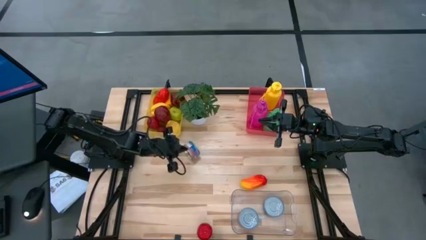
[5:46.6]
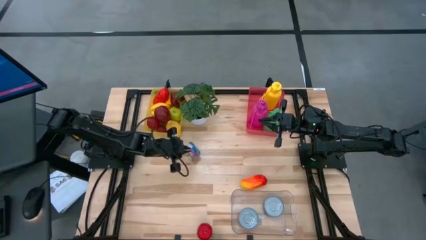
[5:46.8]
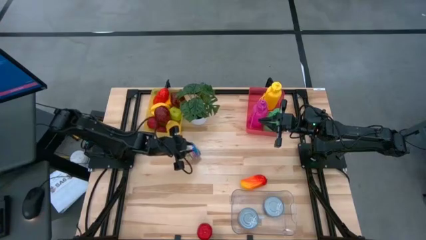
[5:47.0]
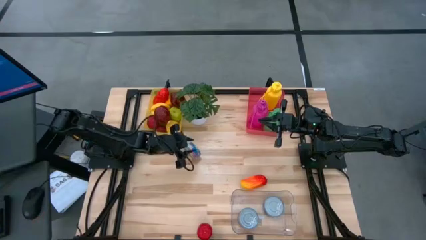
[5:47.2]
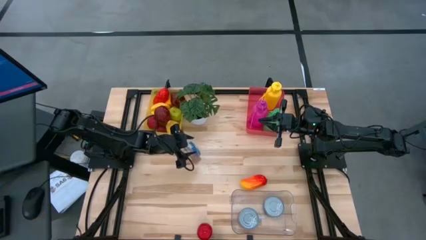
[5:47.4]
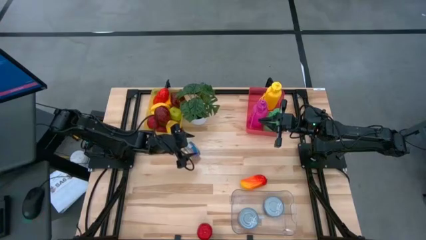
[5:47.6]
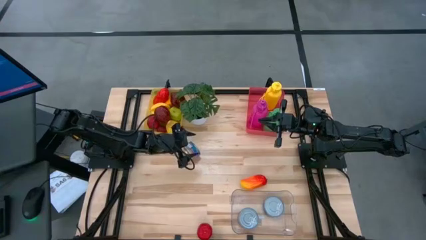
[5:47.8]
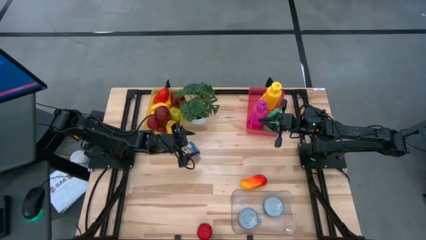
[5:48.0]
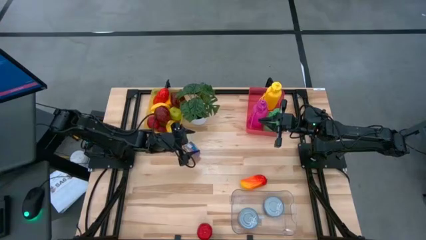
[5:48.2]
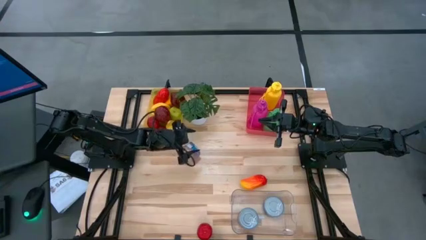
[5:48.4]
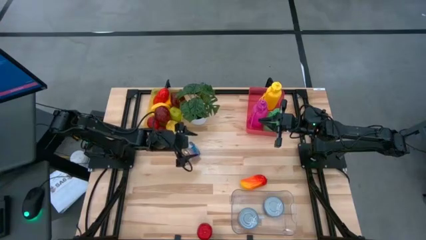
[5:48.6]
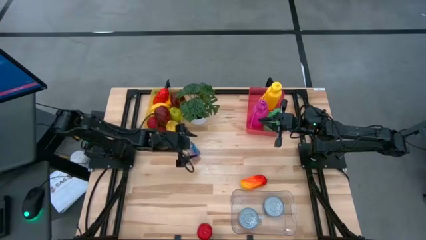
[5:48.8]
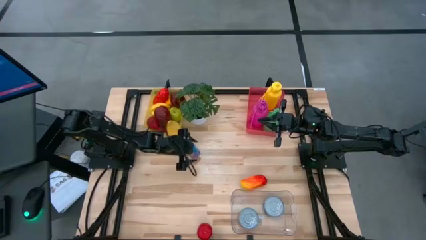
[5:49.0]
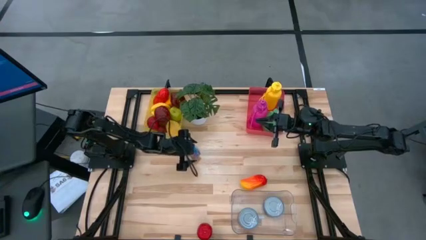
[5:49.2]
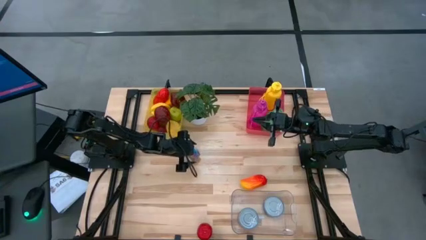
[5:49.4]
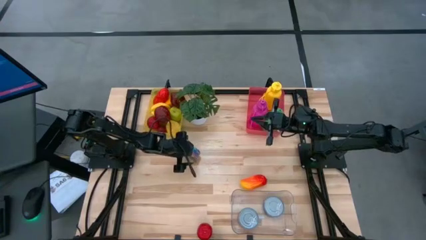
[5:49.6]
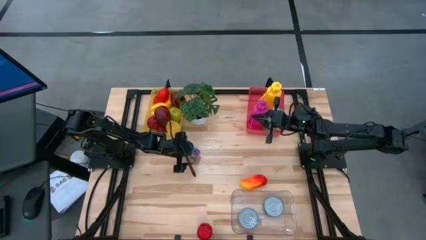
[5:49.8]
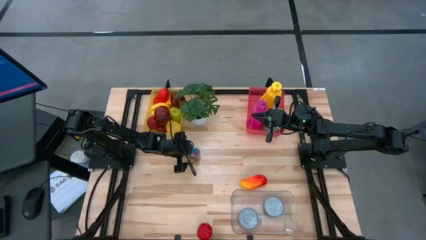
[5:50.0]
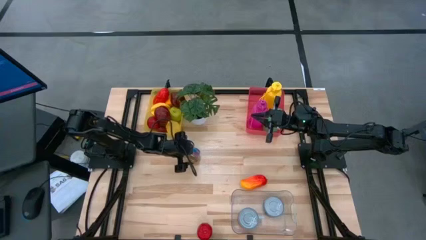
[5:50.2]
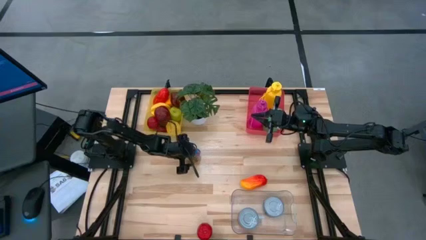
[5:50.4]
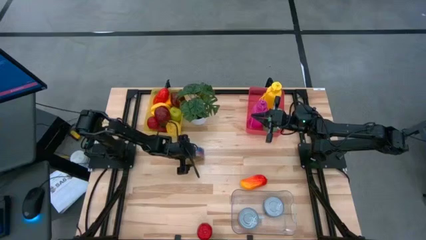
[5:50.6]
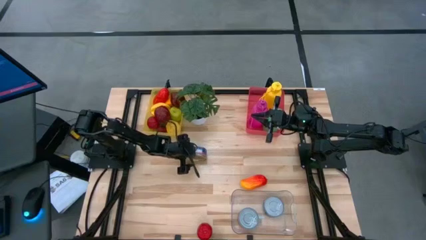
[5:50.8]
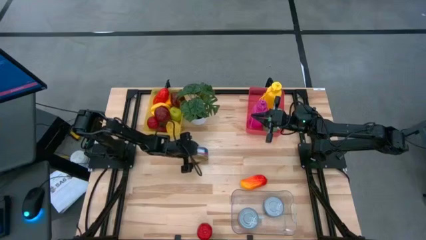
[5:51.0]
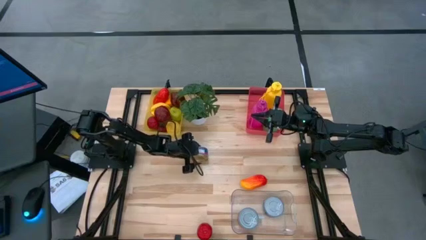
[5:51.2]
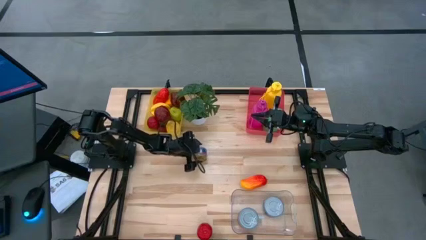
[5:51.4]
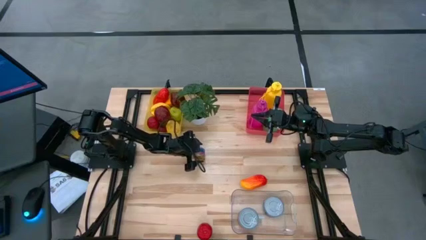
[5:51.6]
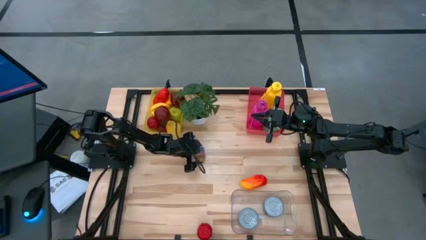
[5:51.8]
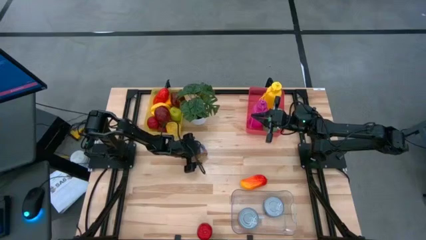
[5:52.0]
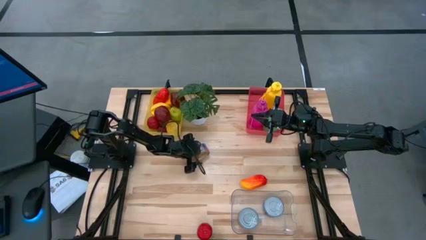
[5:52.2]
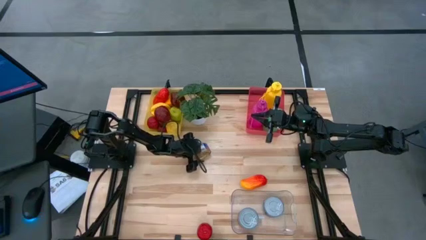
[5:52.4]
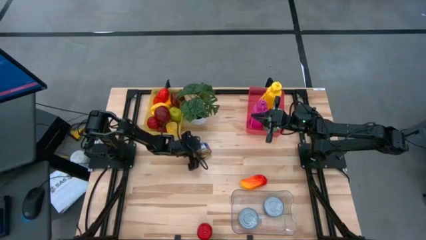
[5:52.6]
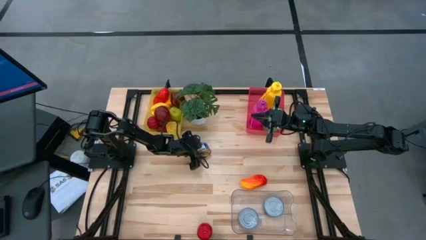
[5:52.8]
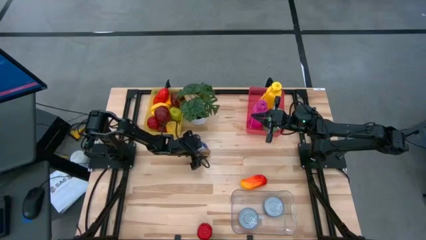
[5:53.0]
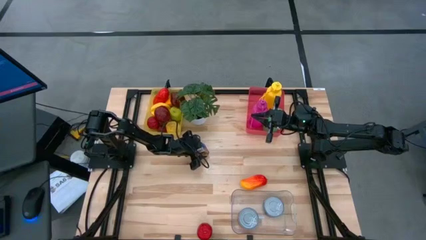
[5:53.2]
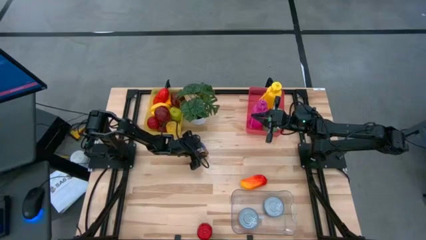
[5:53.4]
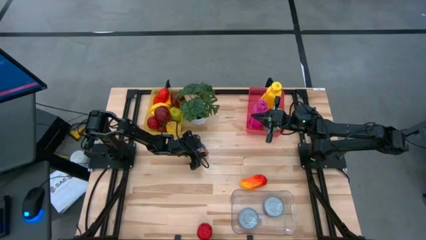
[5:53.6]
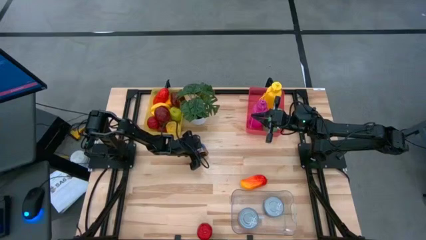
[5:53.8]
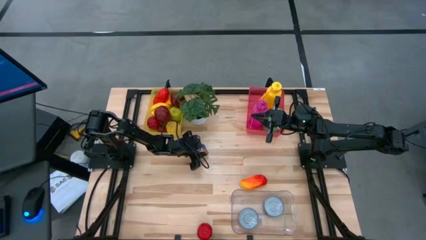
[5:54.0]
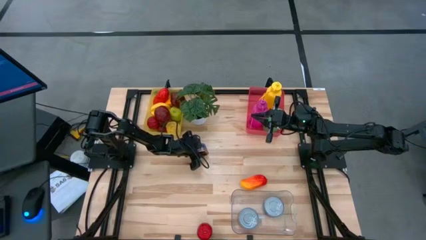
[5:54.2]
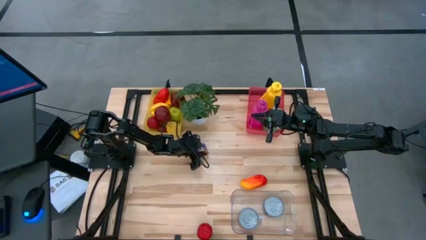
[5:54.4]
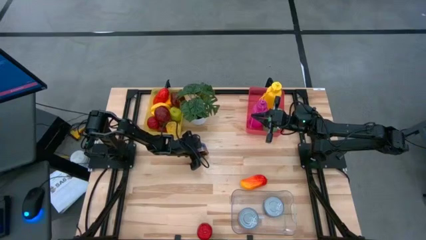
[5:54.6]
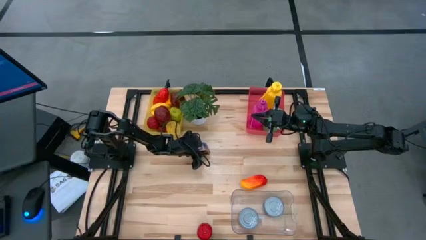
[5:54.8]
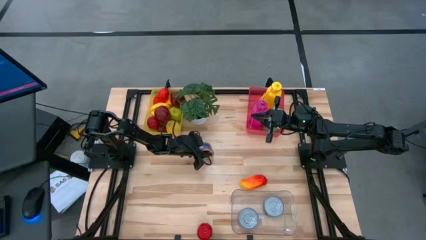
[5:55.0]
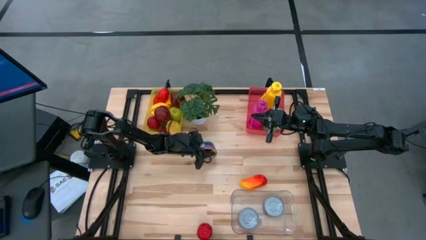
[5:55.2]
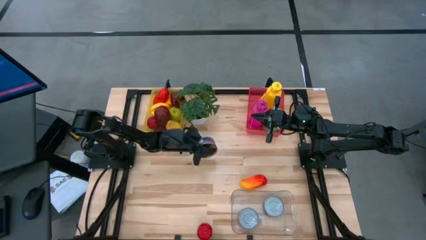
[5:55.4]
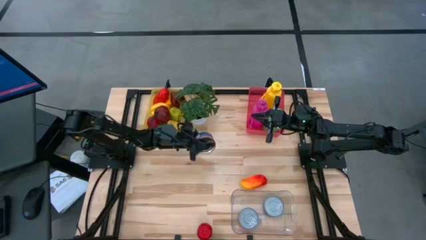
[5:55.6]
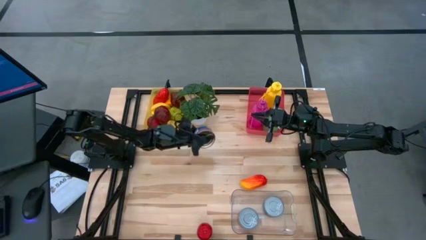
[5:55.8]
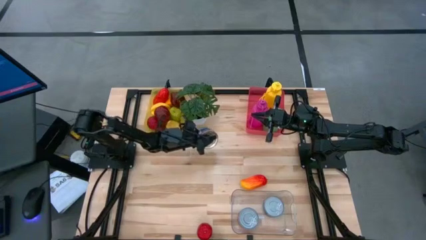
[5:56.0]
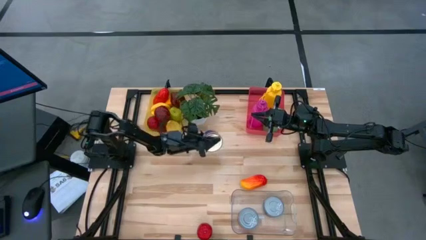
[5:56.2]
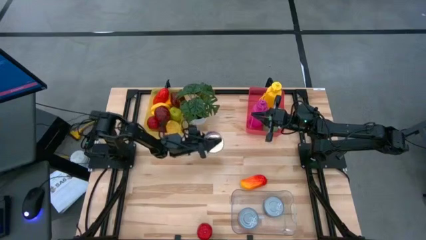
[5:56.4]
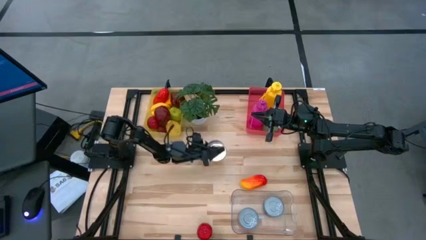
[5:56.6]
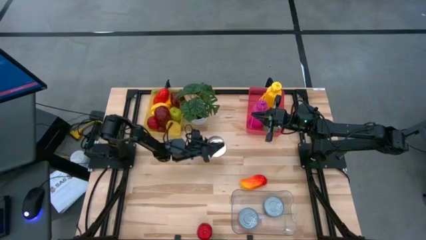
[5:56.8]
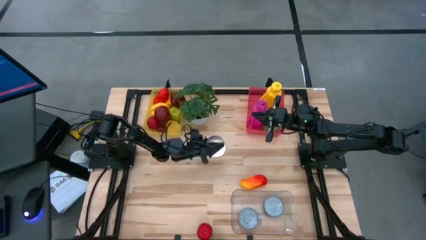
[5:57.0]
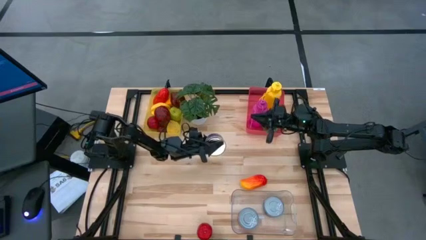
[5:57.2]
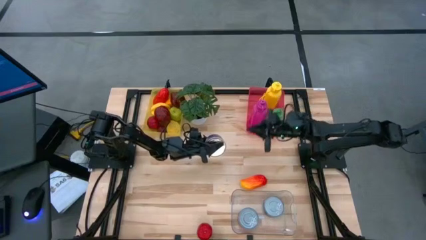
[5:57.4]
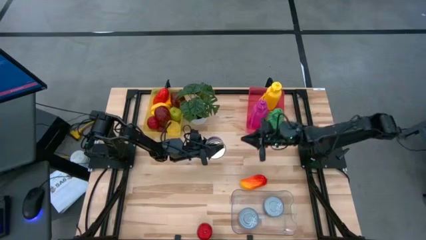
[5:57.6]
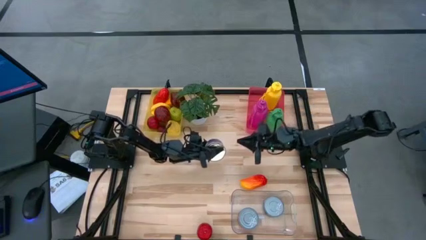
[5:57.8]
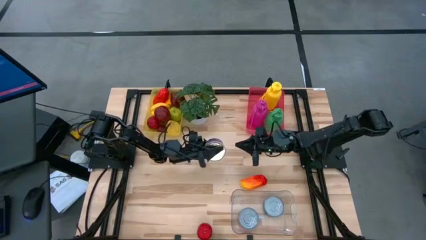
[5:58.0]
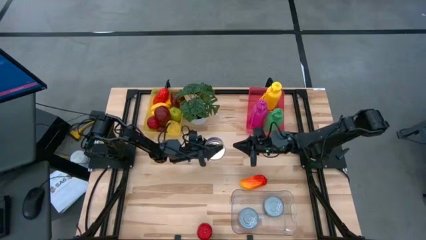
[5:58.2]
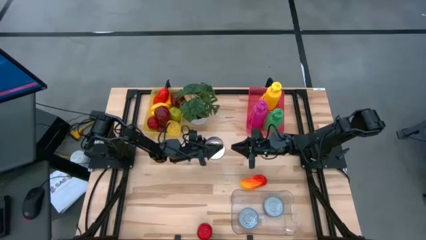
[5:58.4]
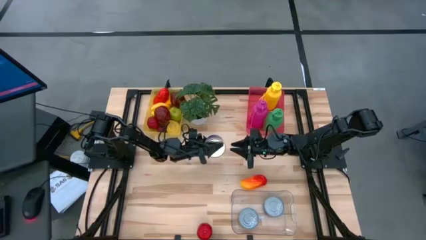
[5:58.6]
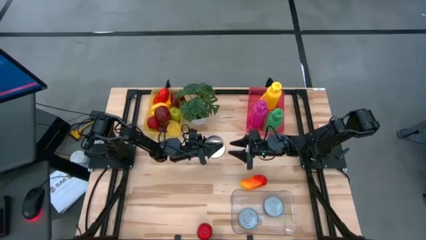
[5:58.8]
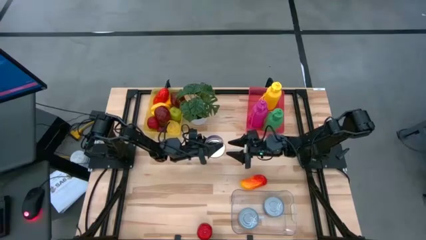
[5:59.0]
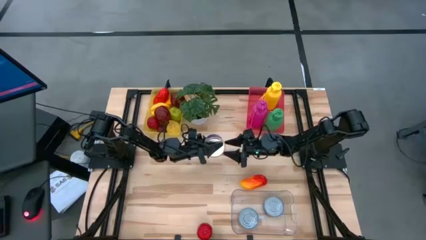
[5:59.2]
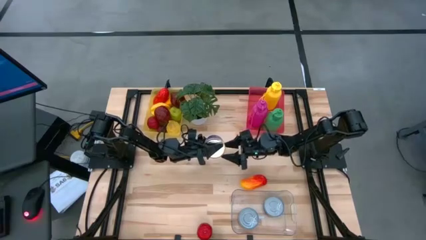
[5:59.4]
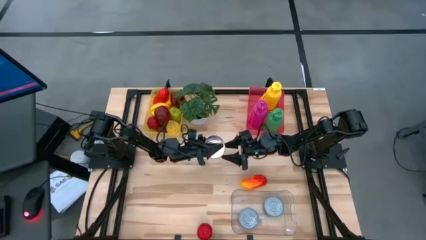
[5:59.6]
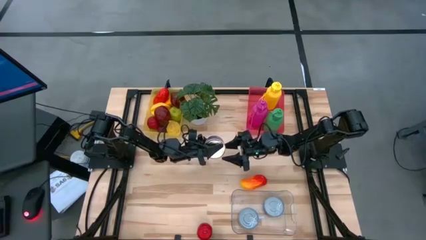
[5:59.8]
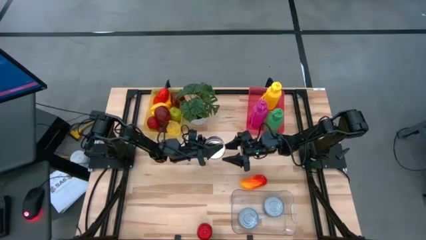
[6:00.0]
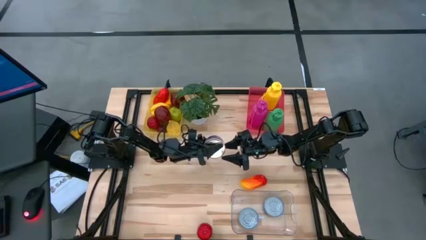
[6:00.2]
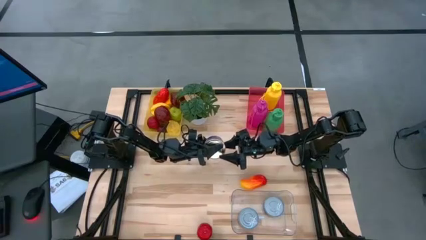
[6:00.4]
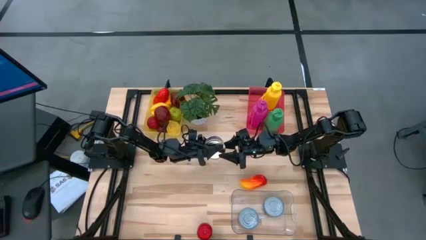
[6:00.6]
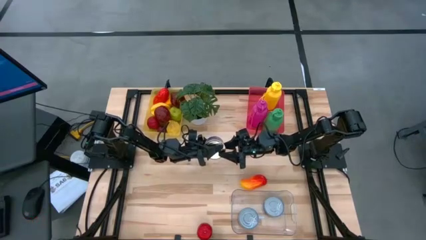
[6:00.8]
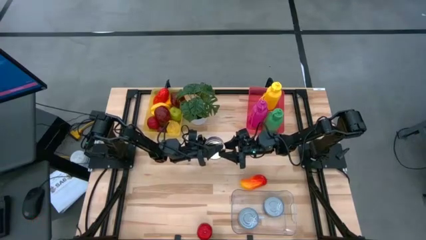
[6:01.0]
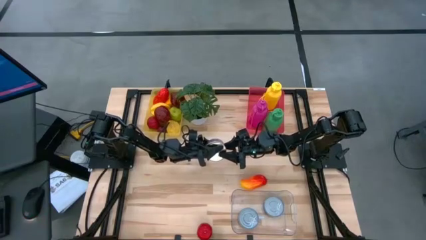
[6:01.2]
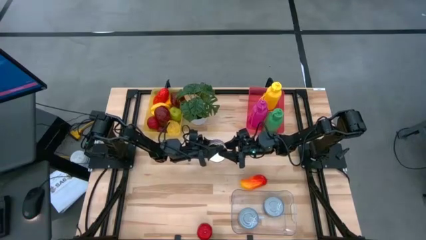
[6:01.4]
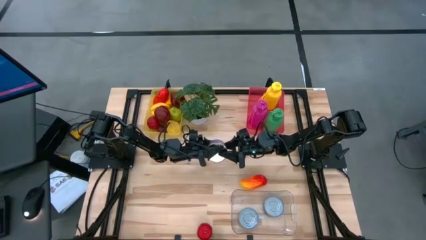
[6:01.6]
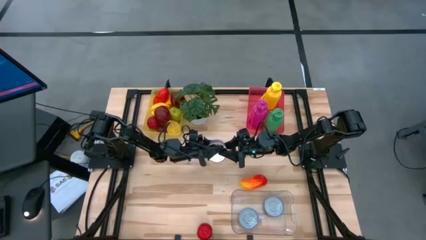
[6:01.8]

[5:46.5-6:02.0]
Task: Pick & Place Food Item
Put the blue pink tuna can into the transparent bin
